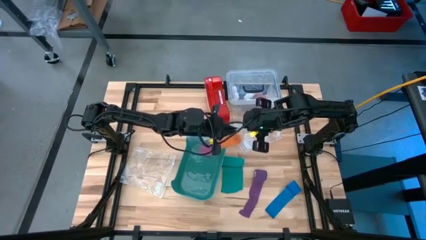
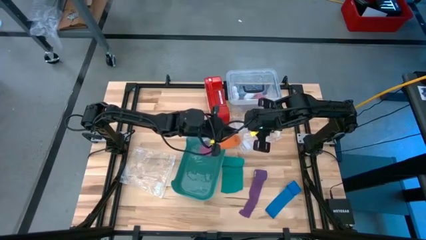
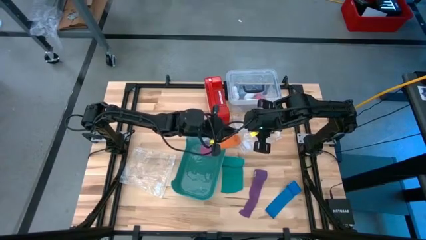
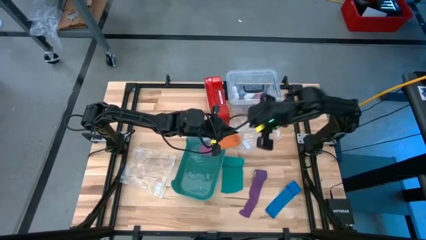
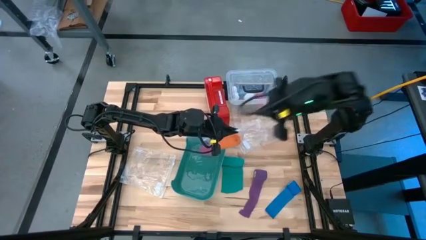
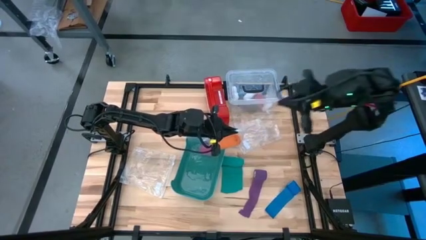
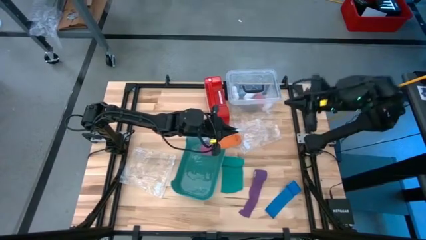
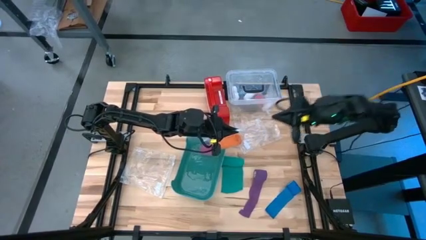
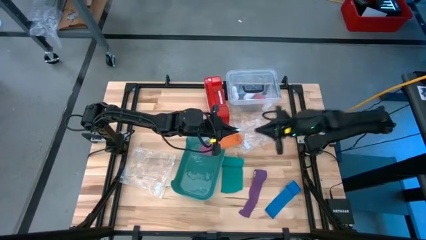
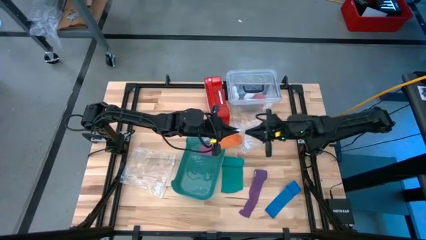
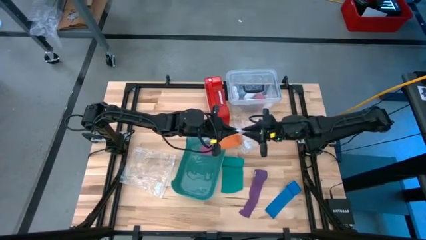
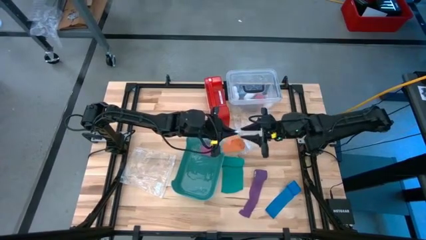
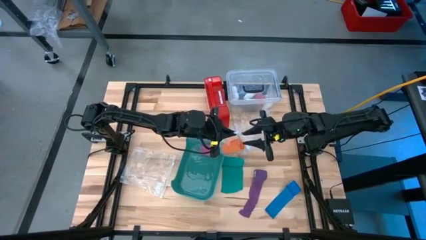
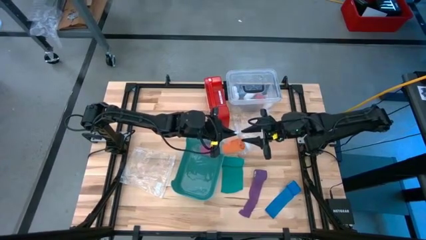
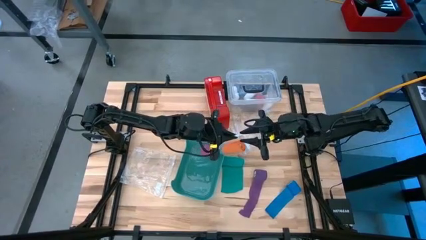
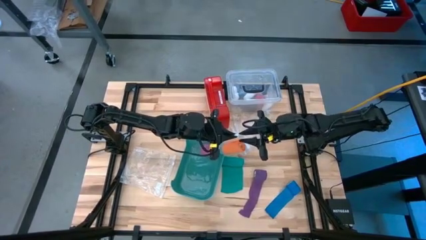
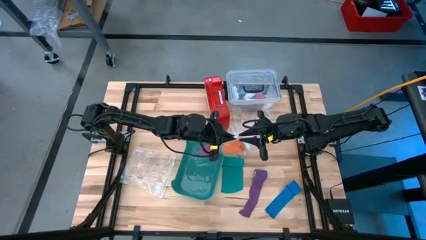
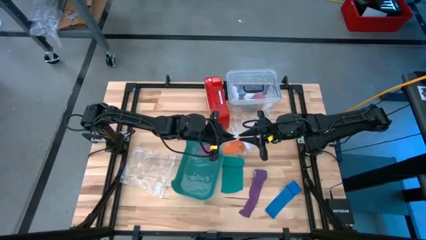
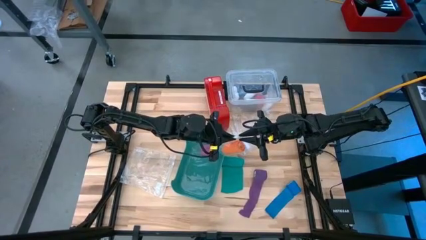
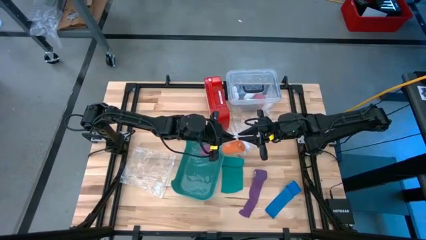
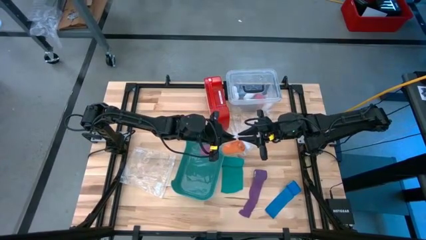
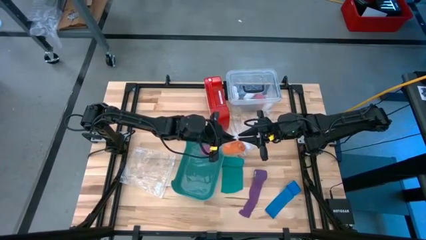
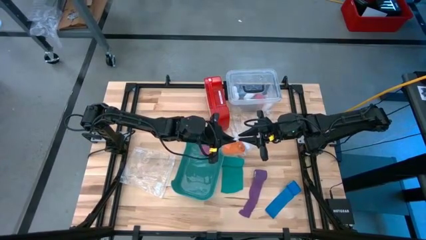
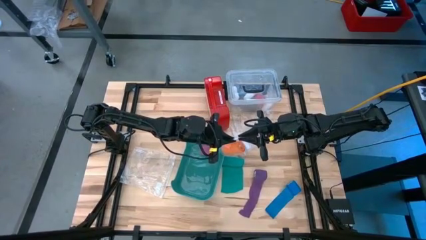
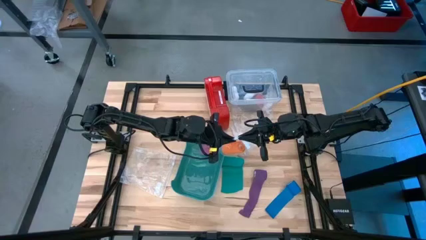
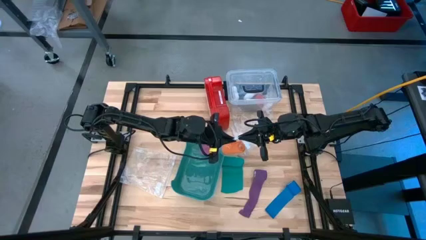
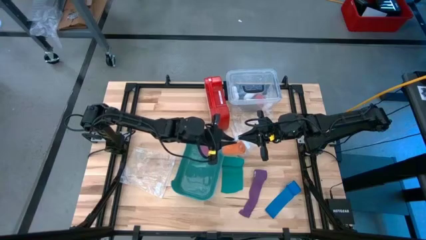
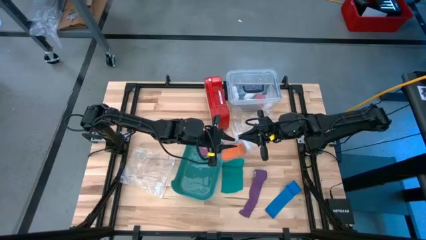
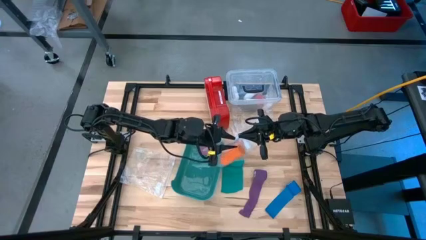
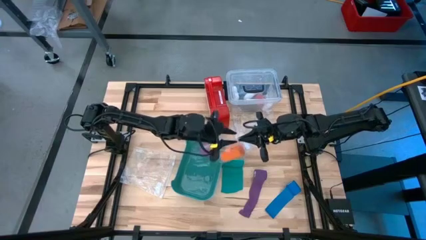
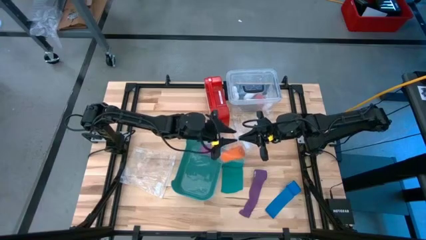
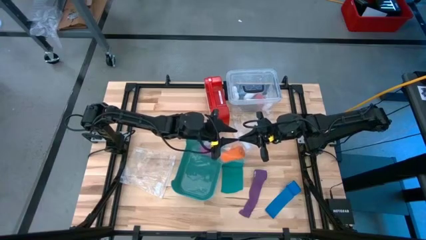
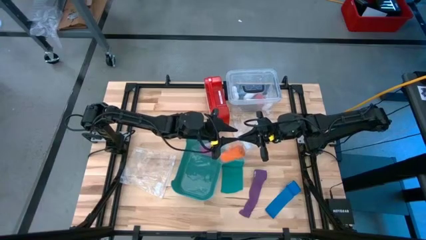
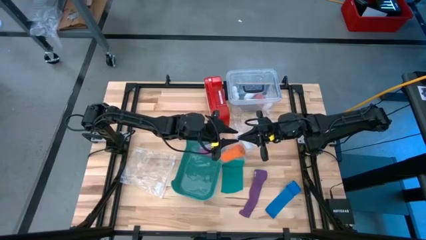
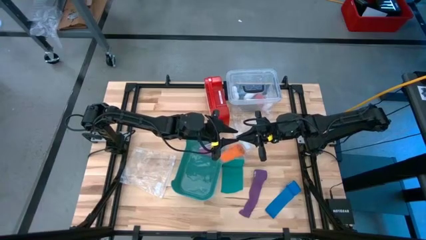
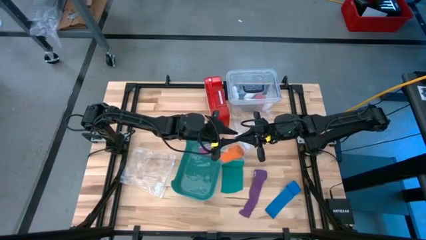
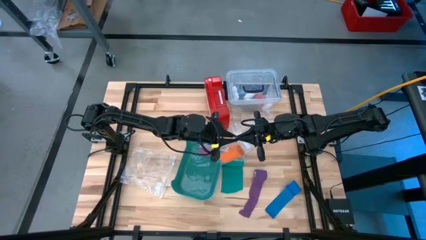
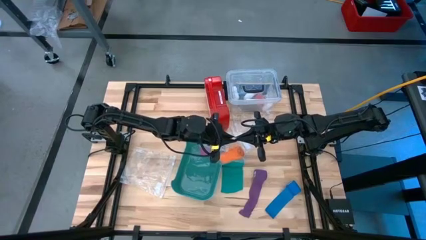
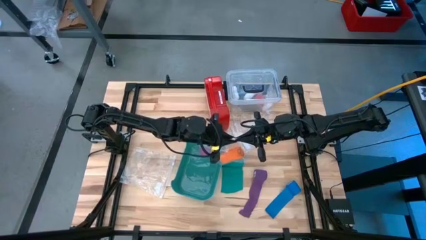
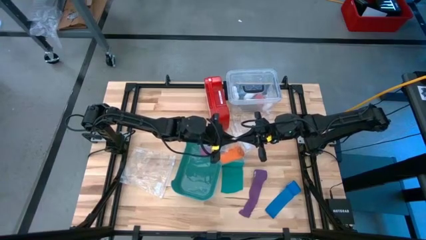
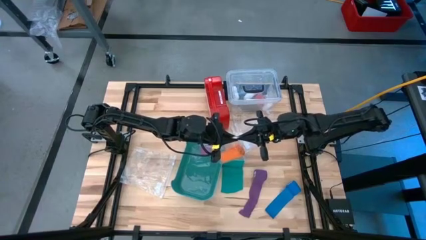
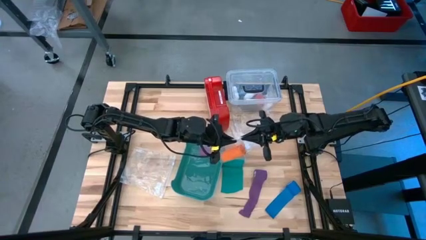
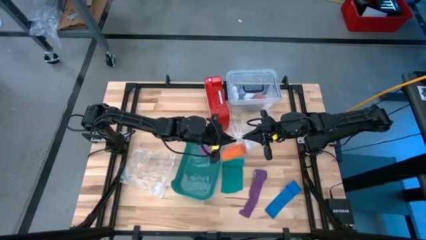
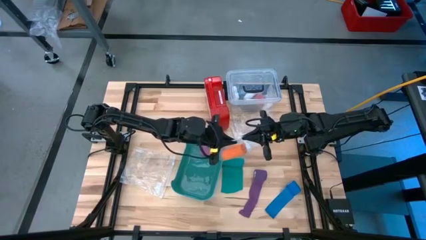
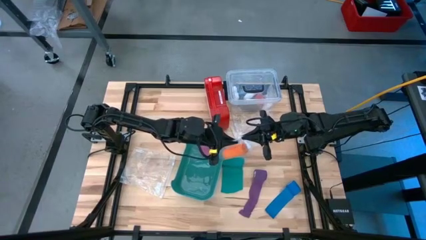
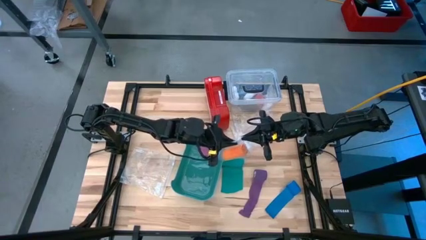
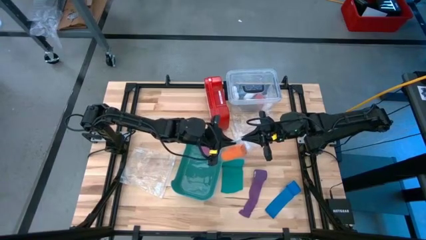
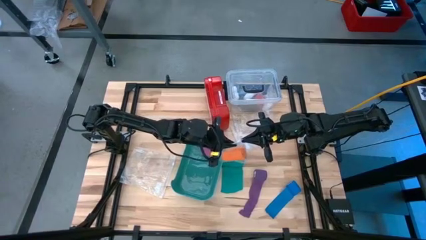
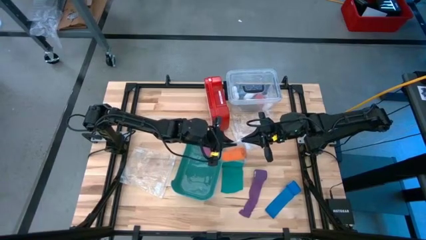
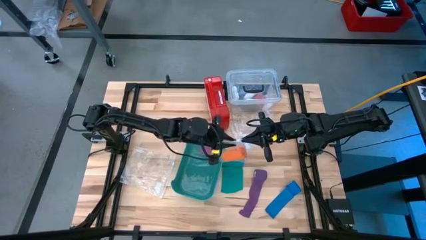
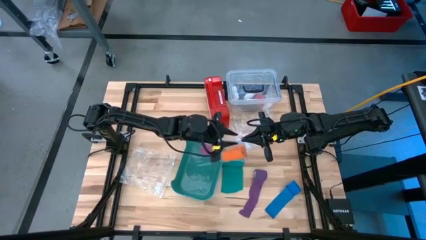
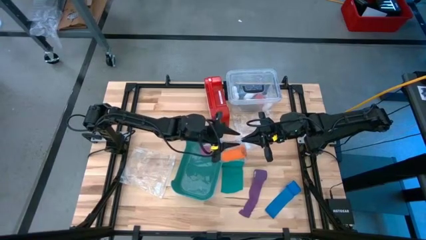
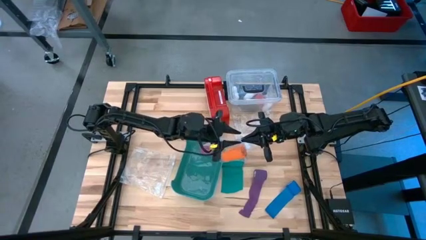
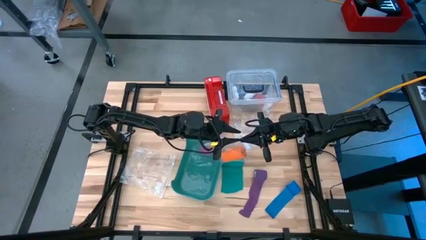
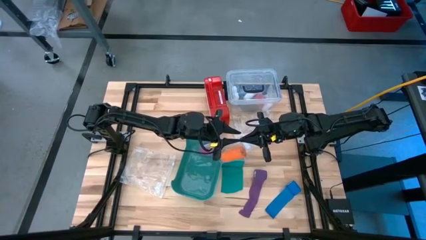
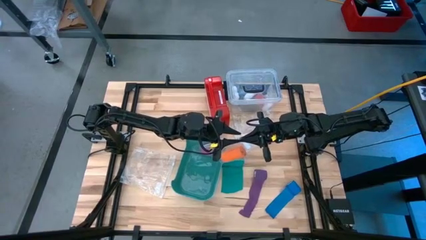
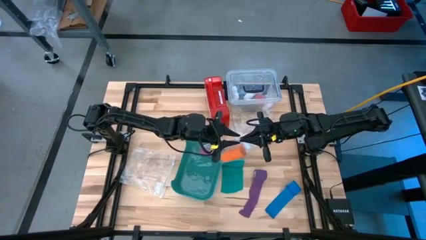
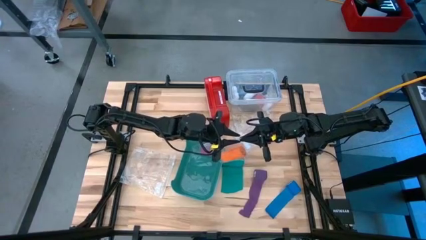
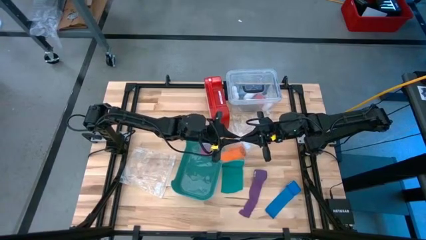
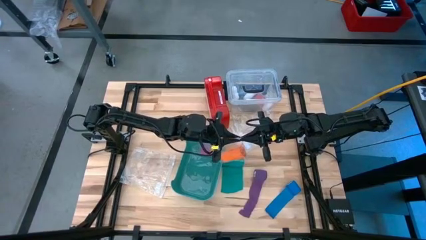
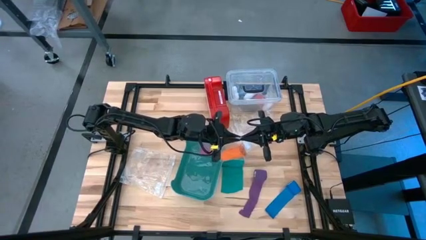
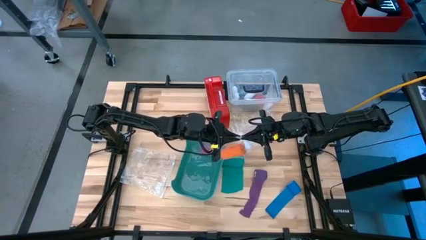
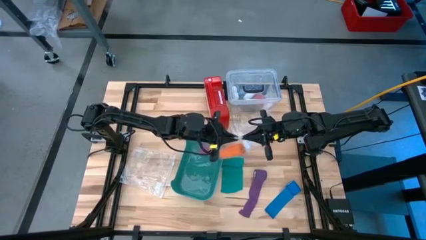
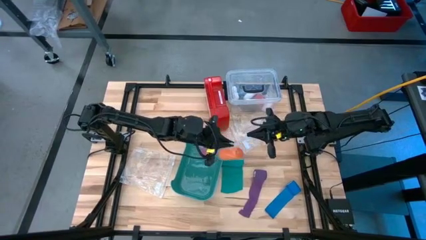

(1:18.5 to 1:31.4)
Task: Roll bandage
Close the transparent zip bag

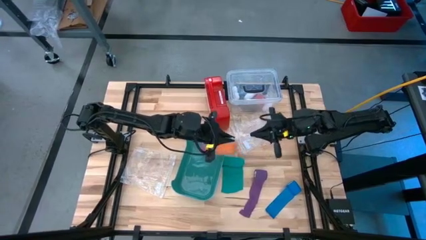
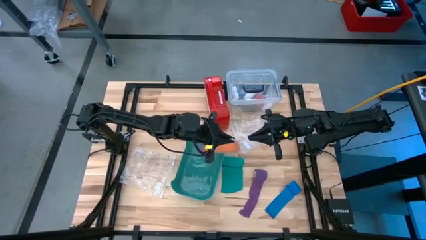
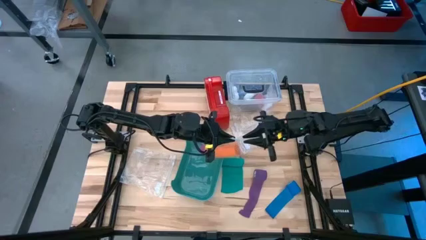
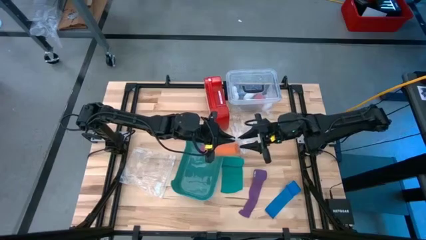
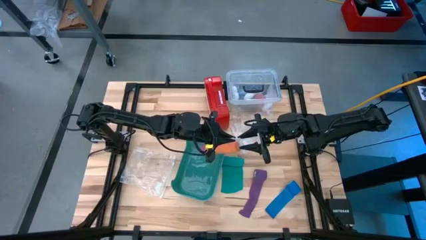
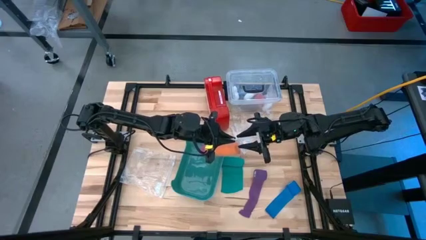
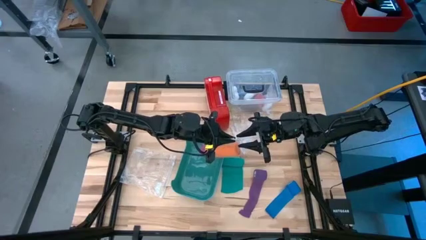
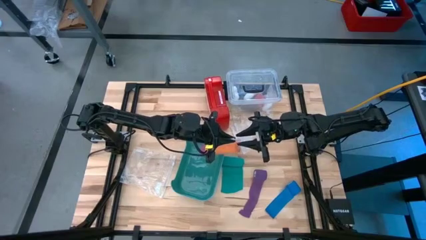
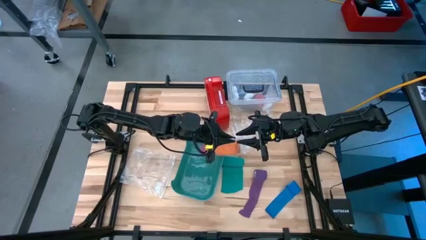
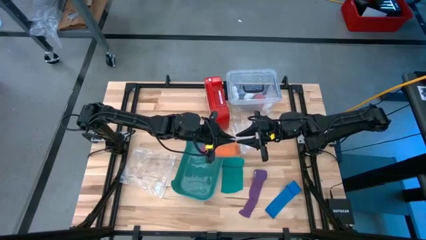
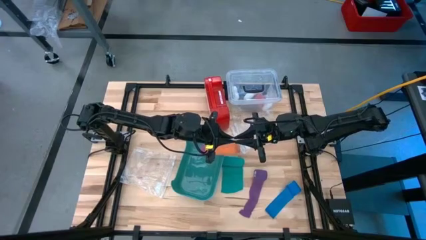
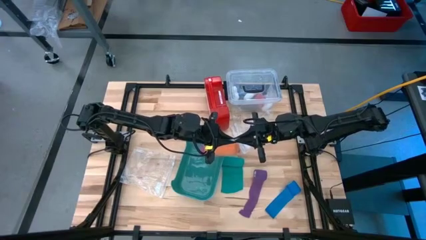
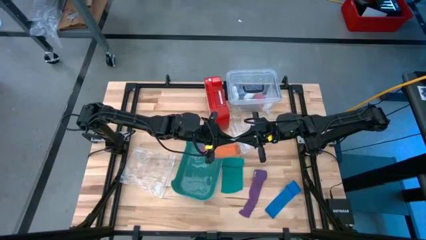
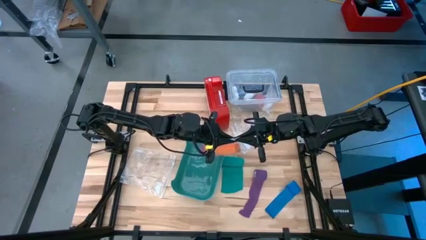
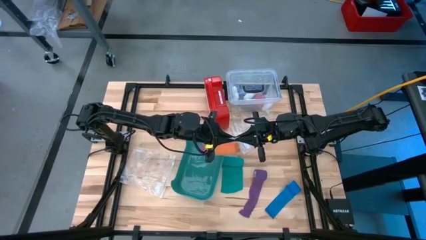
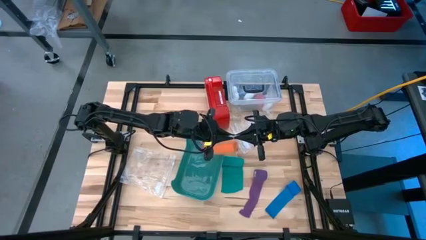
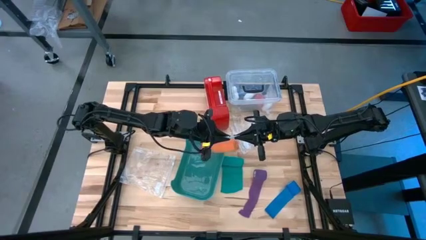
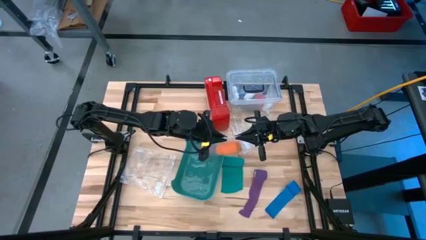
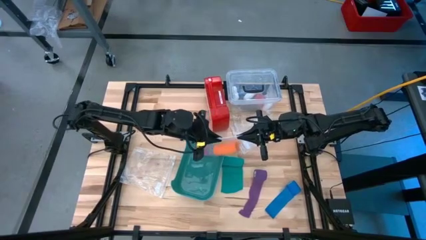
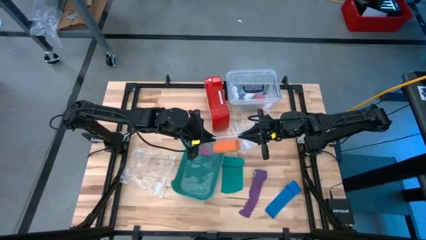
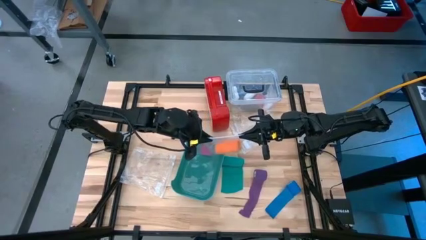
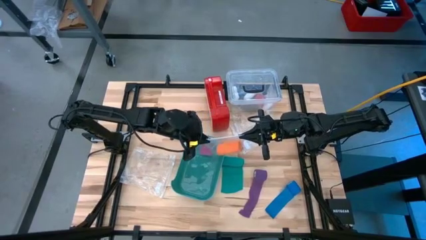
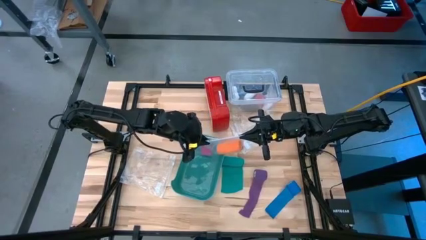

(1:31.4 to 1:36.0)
Close the transparent zip bag
